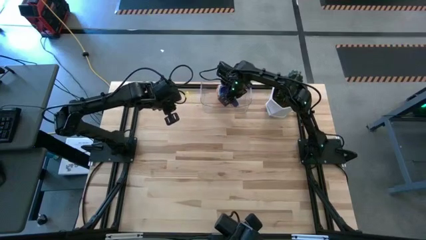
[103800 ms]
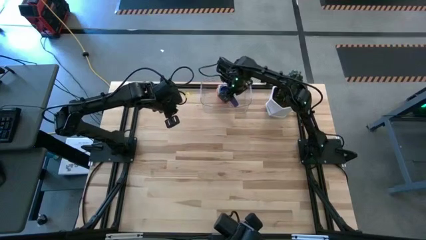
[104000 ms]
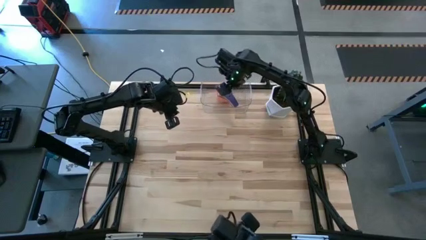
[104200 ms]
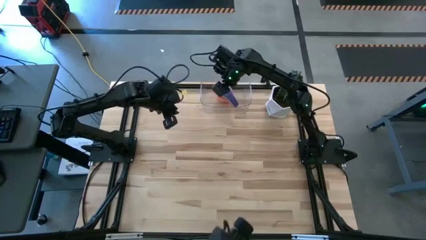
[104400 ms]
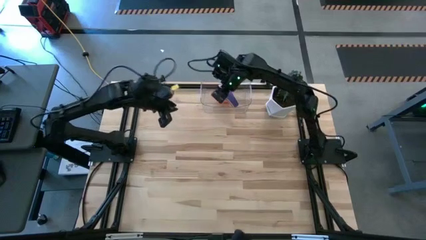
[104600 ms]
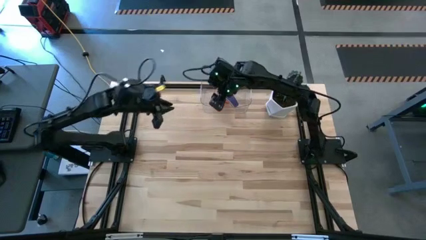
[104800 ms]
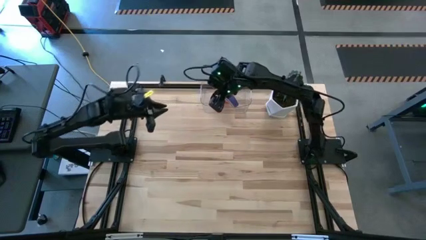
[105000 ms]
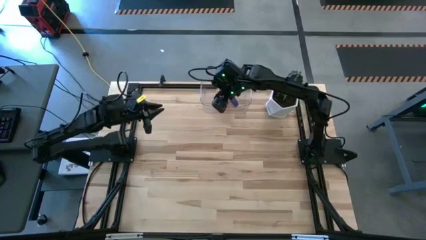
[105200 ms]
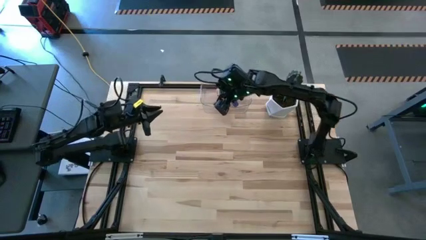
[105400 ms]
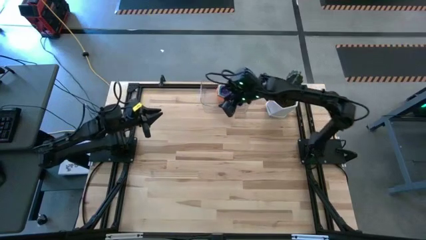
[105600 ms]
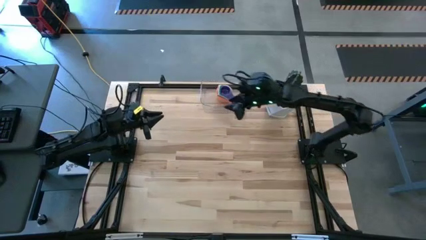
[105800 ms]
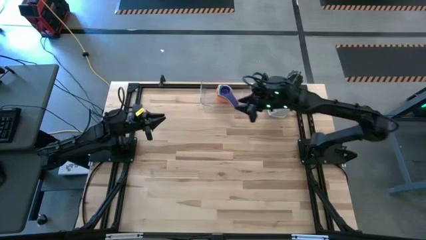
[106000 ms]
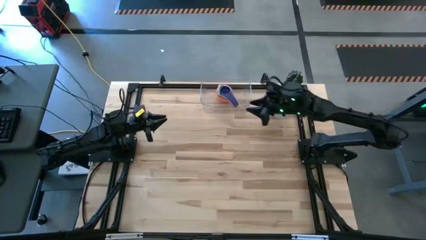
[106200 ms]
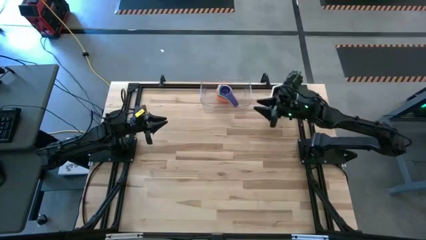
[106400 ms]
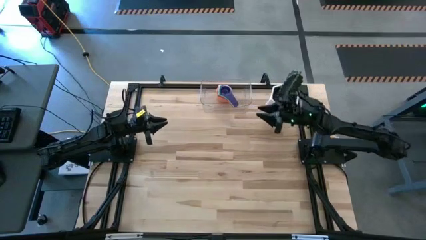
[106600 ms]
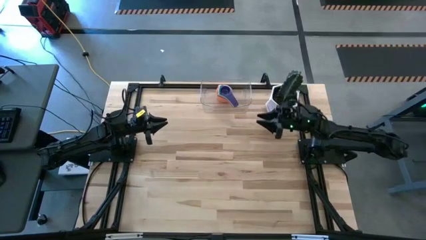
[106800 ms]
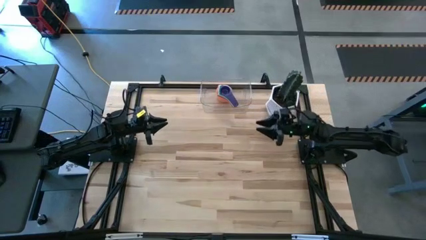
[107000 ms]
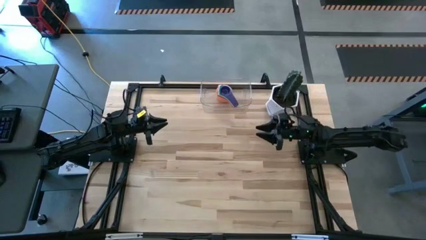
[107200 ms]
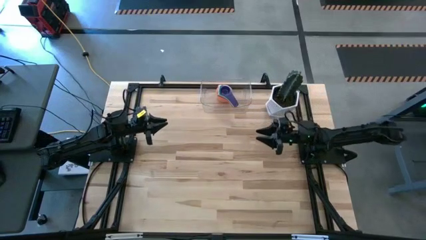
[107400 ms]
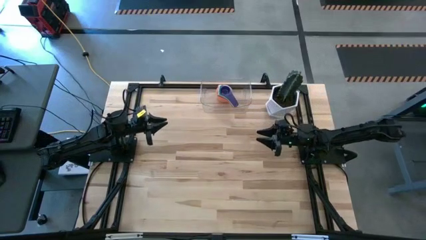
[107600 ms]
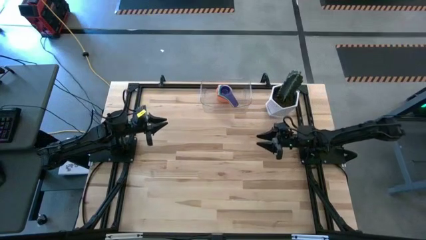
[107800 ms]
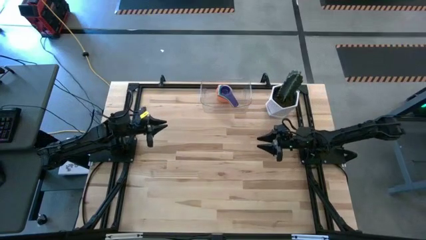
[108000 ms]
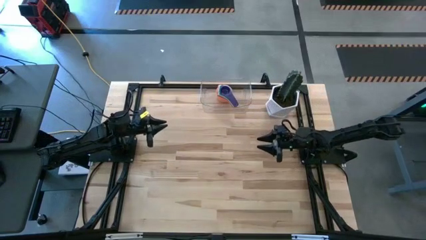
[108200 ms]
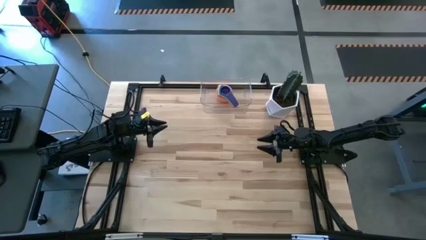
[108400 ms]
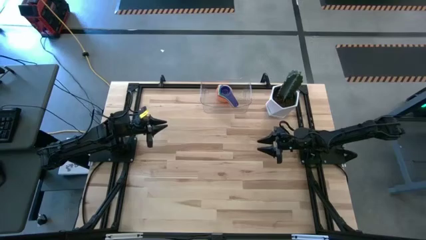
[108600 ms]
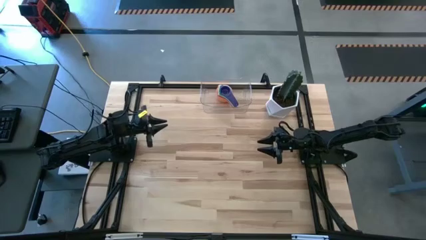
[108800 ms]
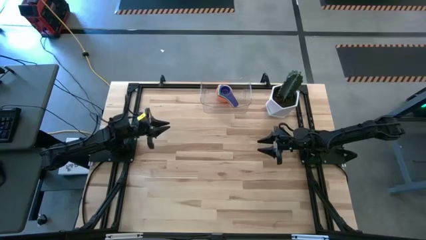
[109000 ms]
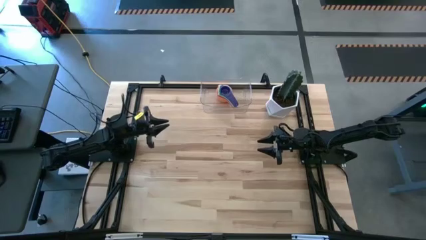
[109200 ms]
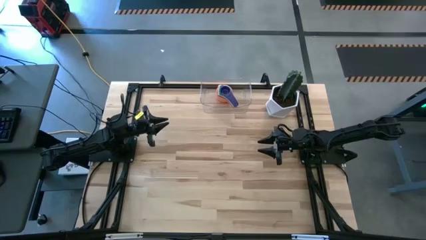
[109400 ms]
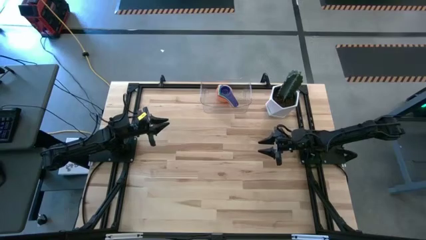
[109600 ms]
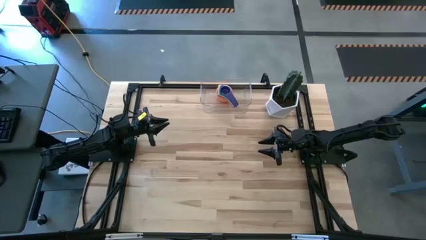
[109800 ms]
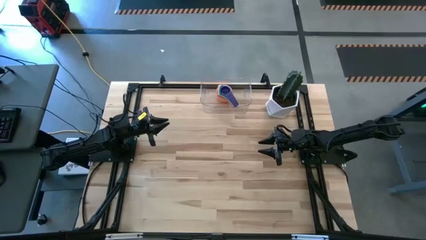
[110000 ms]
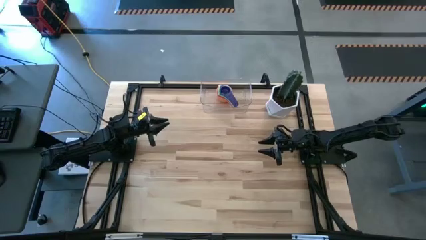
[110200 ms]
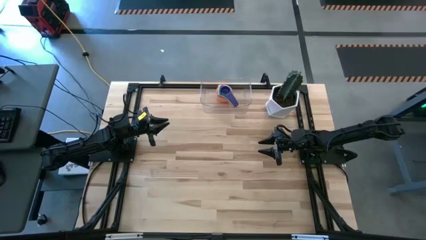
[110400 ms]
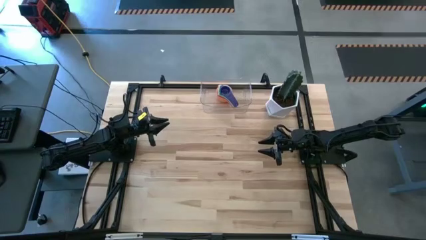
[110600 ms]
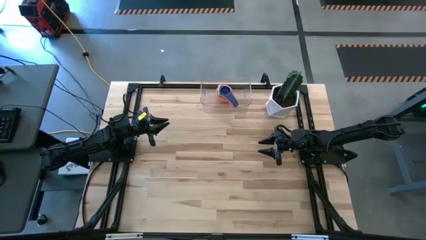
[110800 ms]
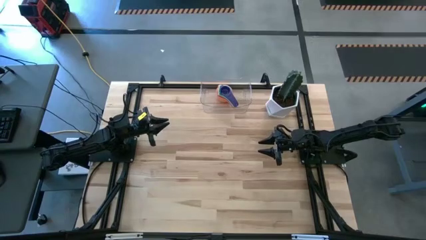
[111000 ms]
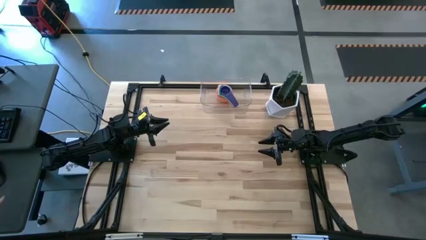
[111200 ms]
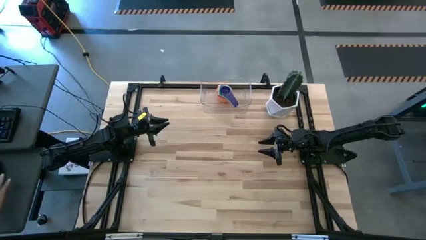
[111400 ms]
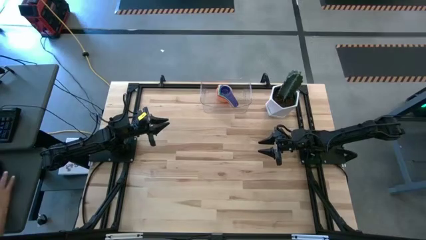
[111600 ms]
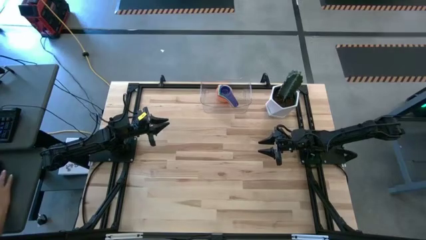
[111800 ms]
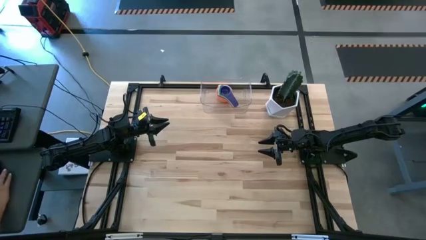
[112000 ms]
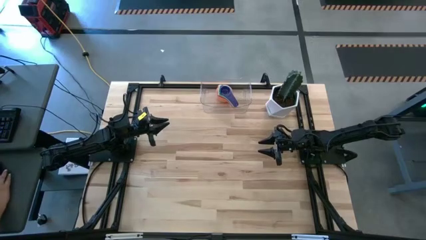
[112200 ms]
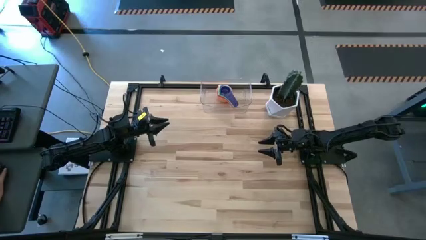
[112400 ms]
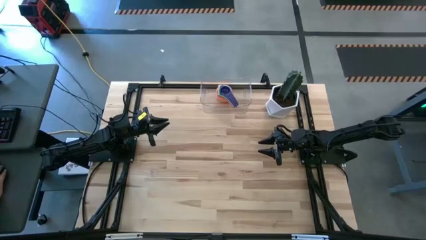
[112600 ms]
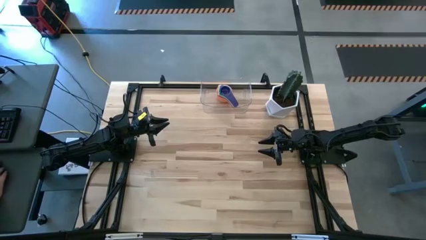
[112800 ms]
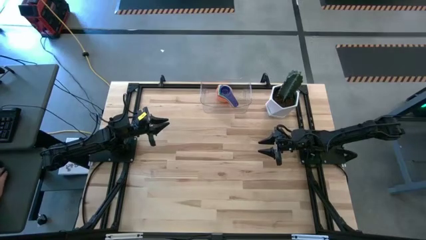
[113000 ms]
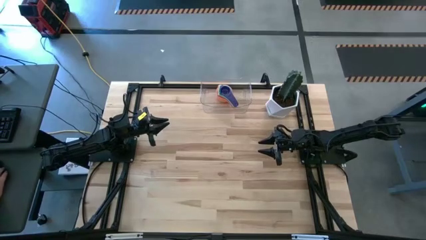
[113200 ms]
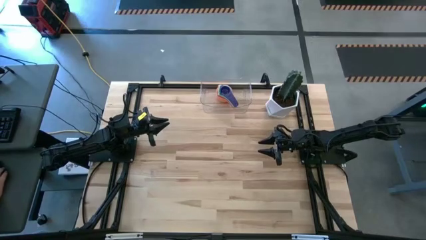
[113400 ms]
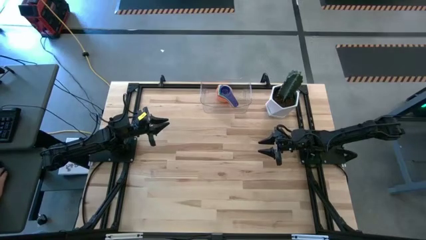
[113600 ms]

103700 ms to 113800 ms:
Task: Nest measuring cups in basket
Return to Home Position

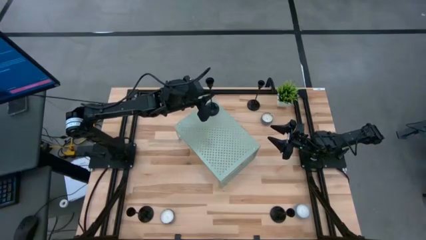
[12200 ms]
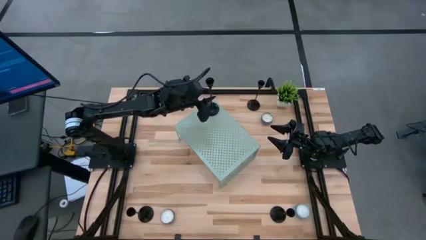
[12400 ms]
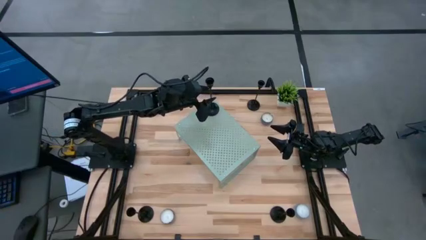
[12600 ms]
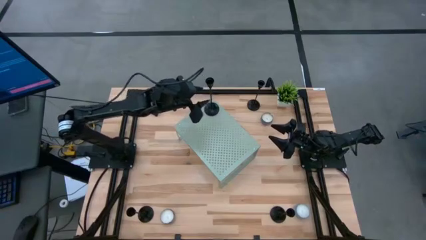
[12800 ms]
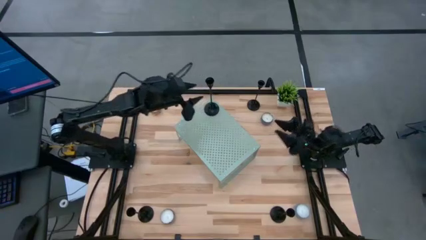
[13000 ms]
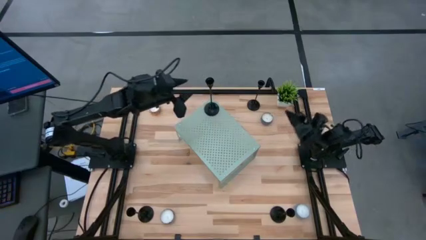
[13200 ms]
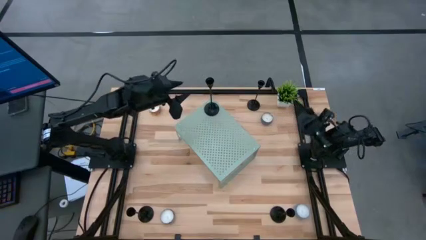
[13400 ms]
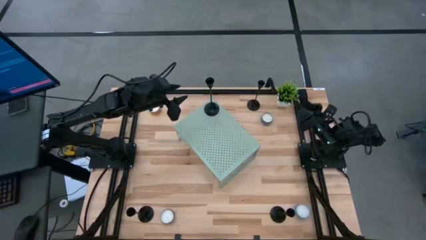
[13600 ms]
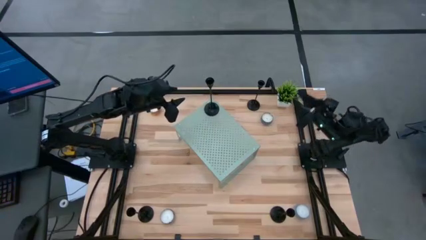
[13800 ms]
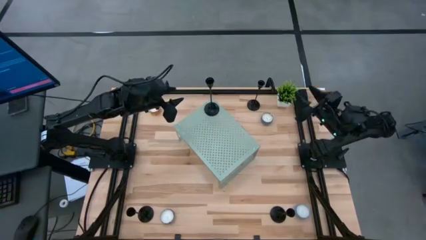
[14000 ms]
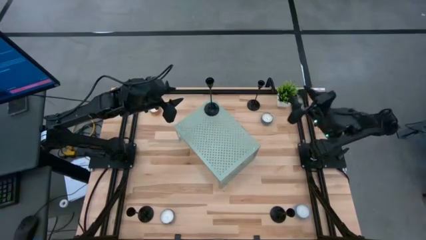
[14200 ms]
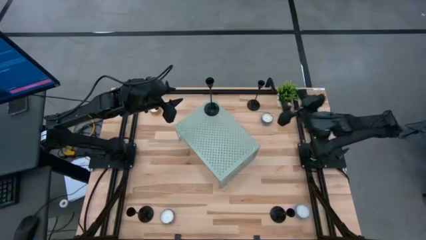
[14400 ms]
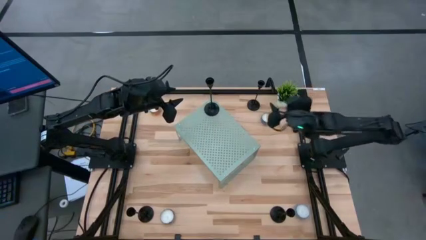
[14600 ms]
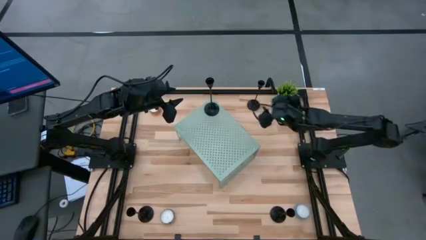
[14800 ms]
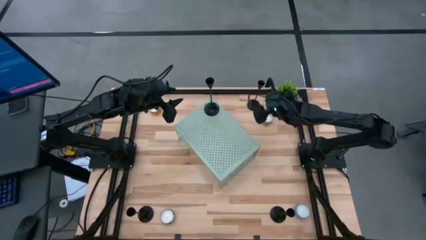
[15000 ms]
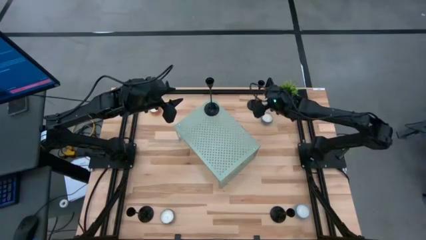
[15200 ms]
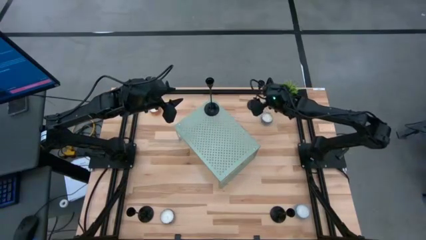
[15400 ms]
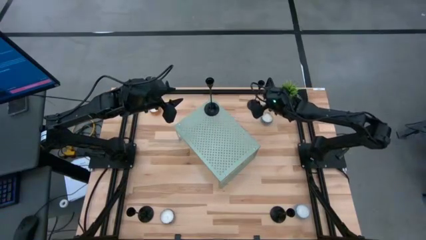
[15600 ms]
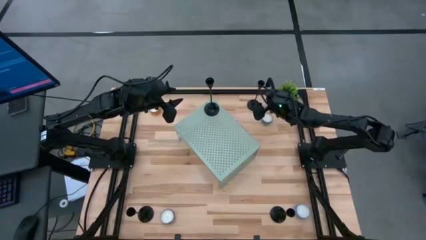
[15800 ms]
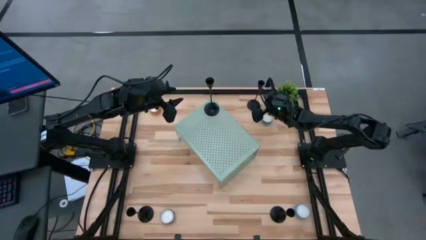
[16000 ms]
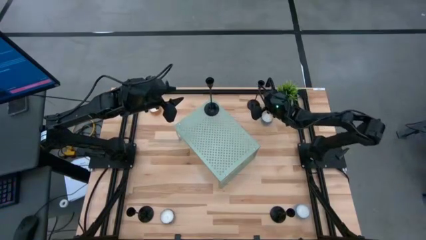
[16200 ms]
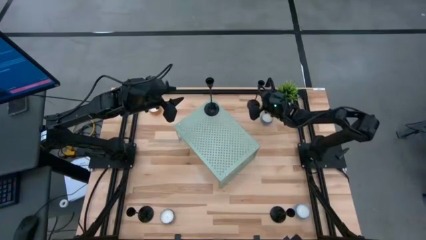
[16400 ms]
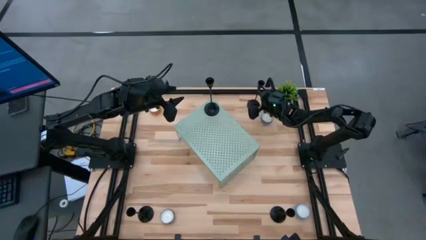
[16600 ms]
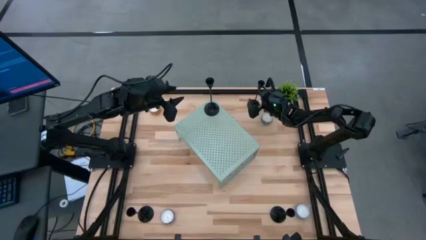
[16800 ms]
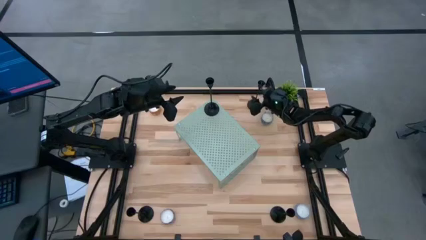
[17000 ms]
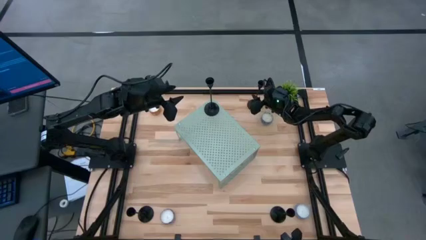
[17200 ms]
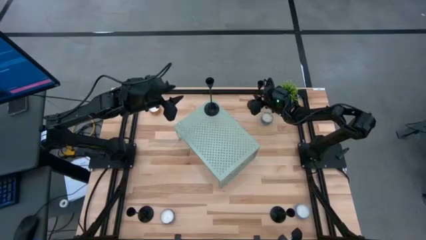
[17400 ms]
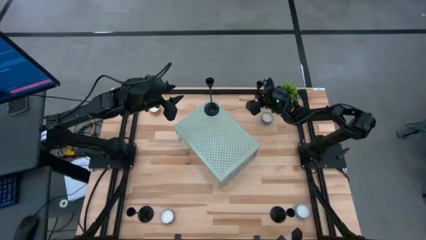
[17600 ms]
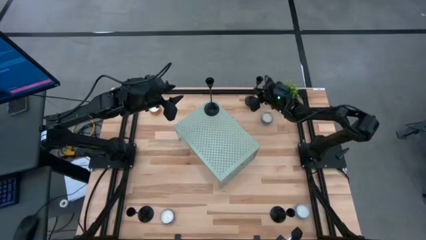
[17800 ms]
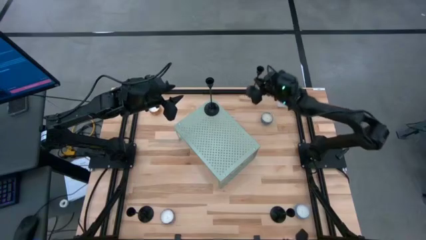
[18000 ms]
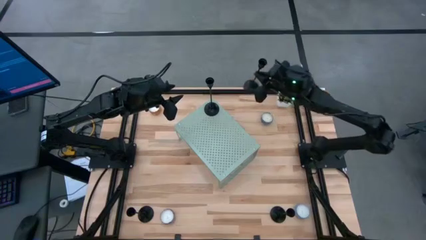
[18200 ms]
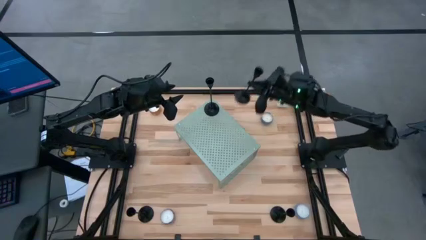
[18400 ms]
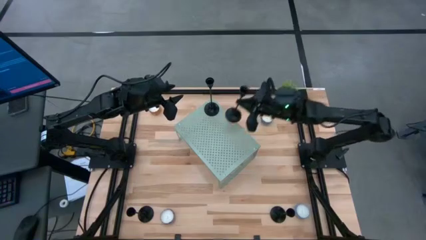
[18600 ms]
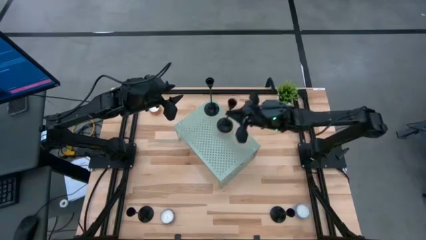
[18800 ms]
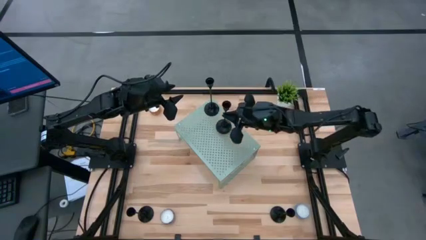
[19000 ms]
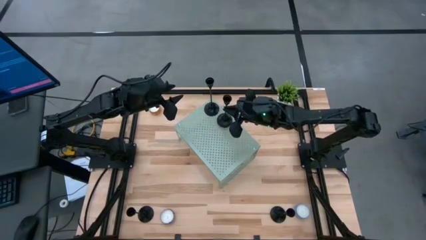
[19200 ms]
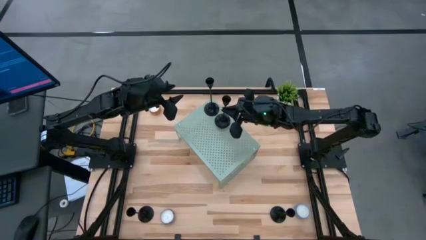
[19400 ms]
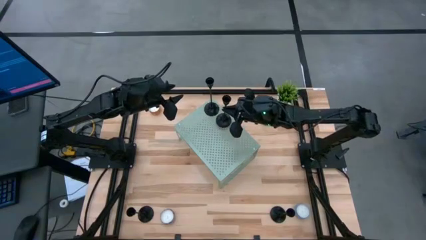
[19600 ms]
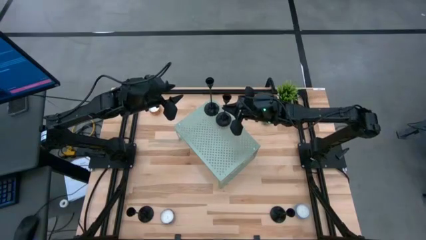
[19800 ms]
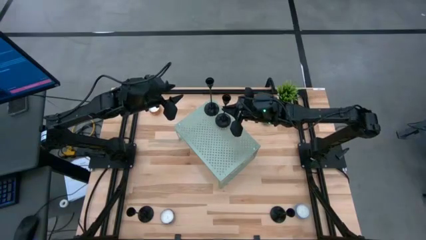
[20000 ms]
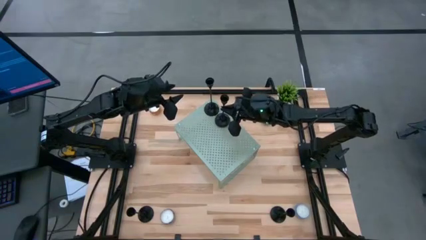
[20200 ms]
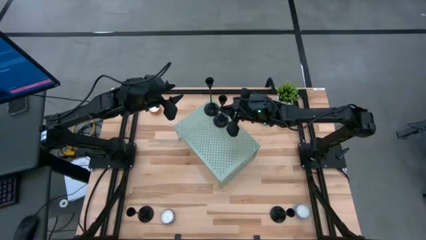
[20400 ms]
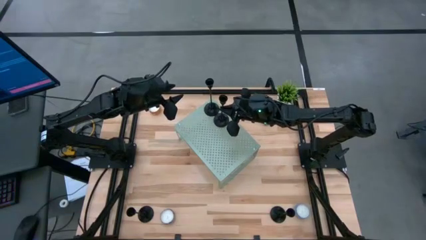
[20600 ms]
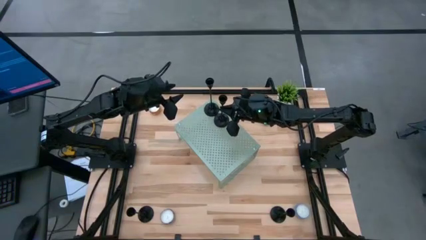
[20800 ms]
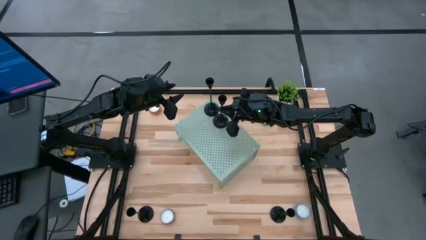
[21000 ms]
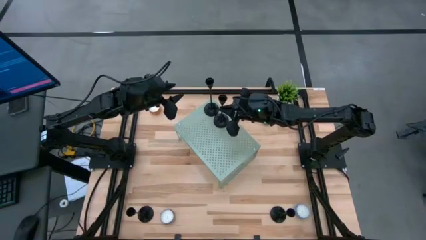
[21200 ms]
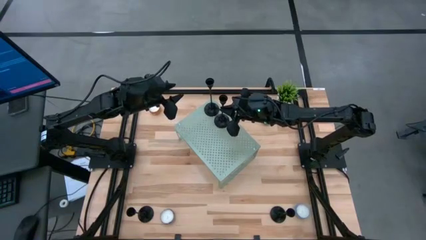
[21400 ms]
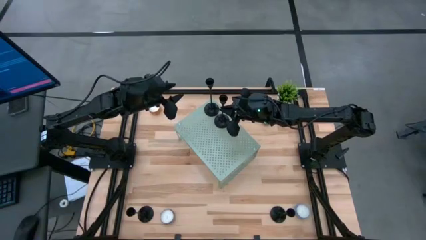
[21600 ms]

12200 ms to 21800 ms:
Task: Pick & Place candle stick holders
Put the top right black candle holder on the shelf
